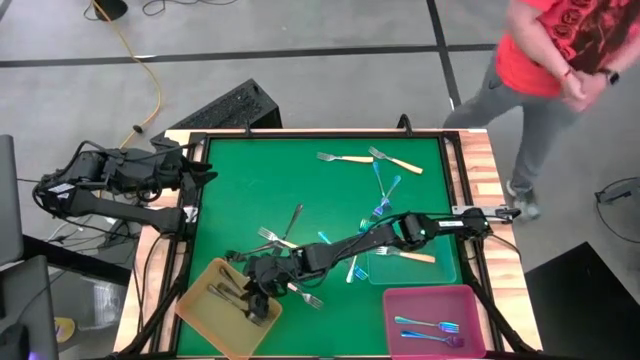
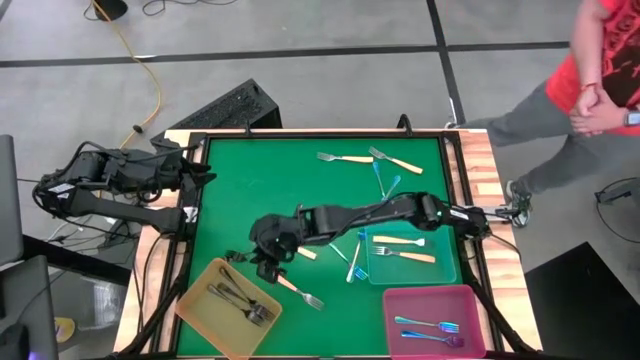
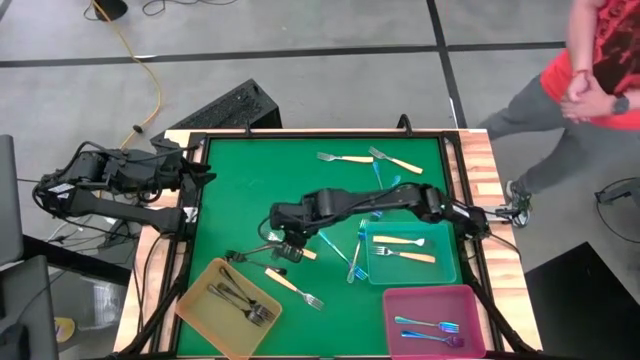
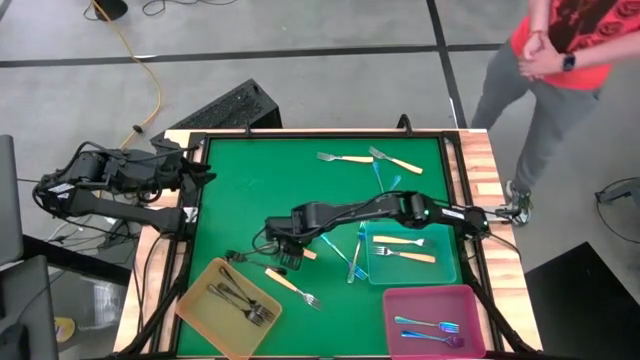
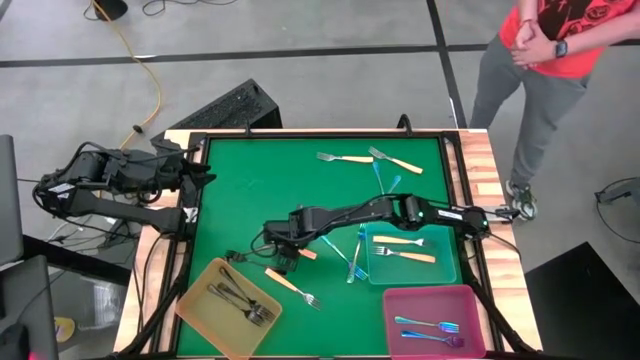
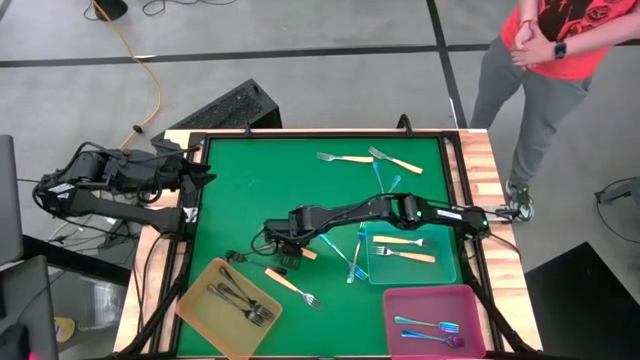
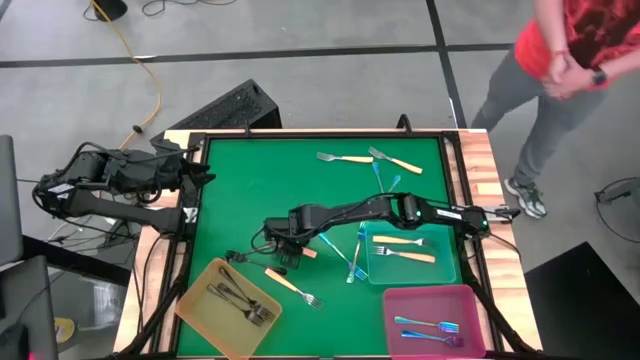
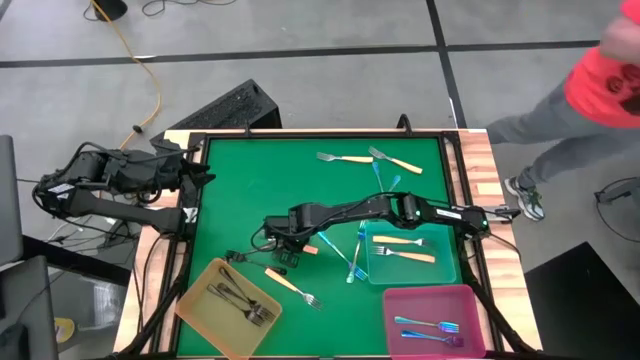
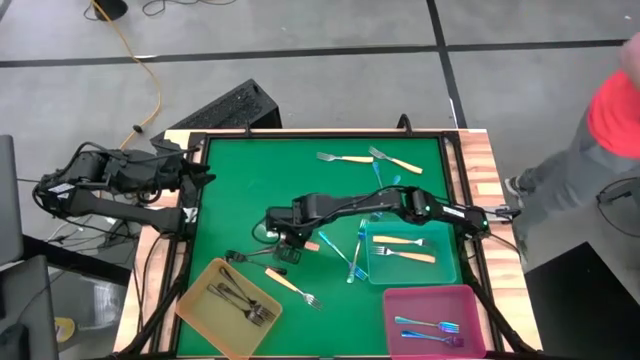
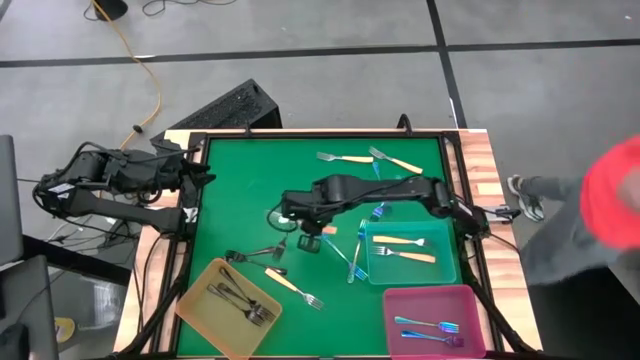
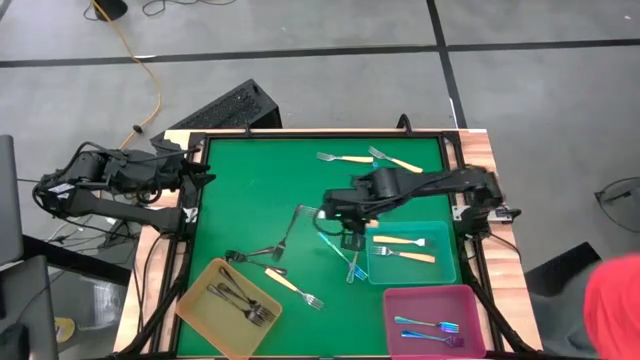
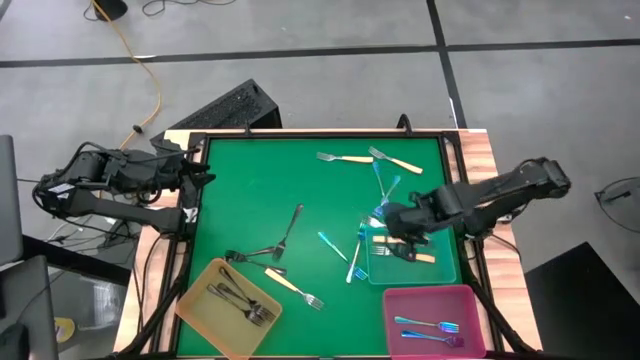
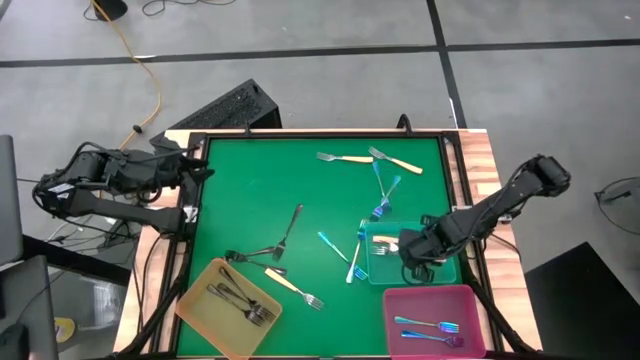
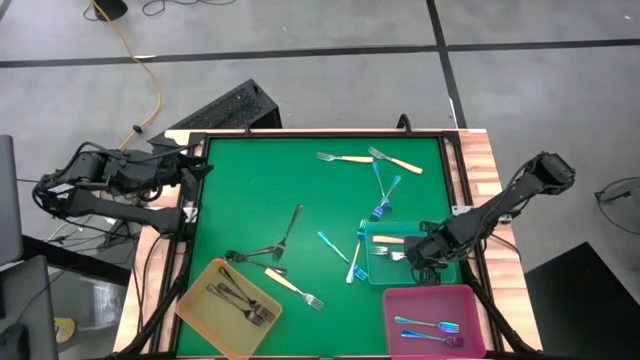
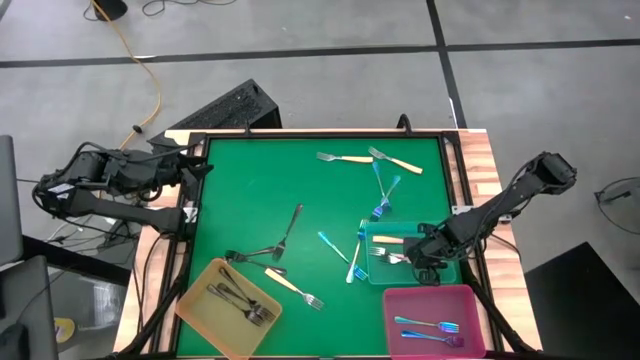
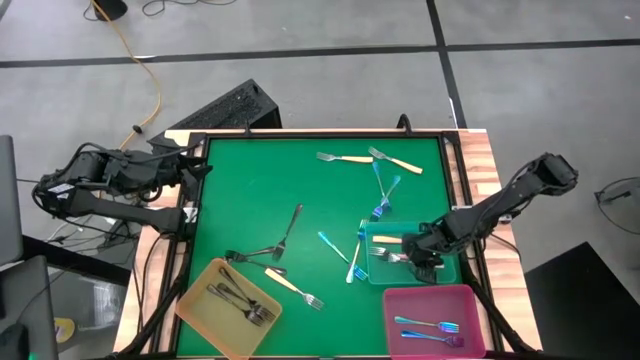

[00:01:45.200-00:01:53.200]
Task: Sort silverware by color (type)
Put the yellow fork into the green bin

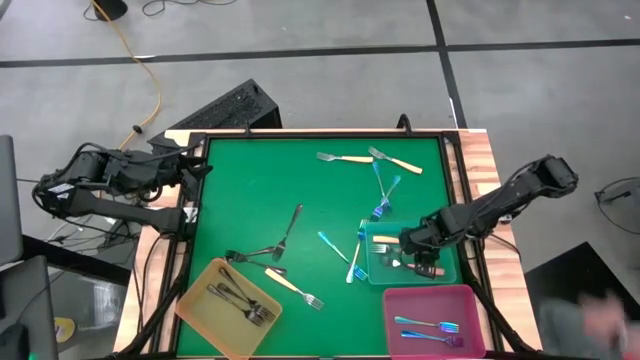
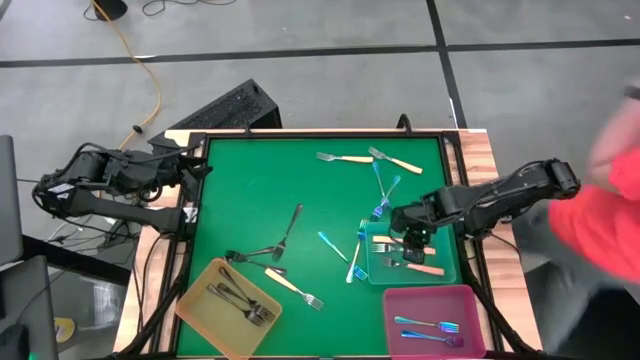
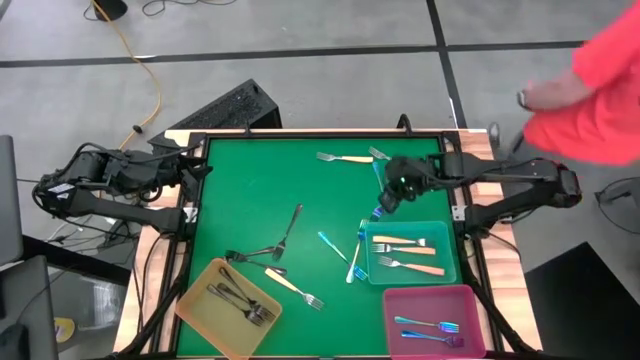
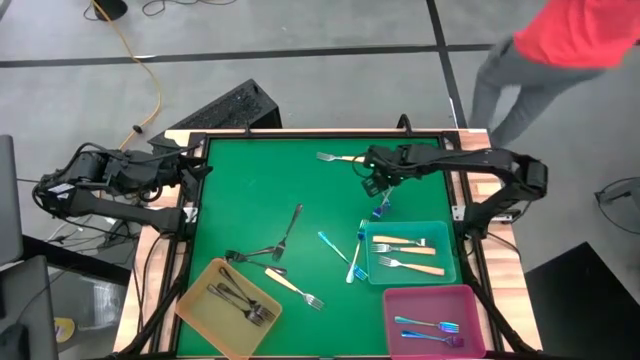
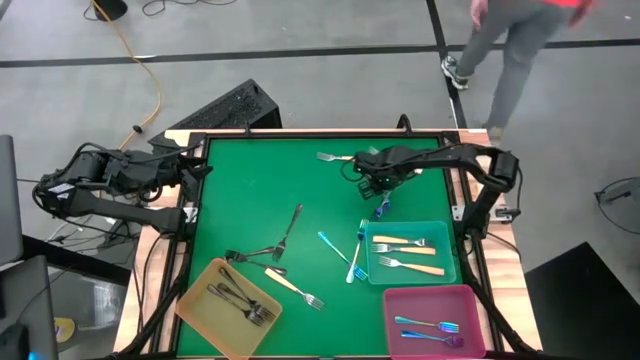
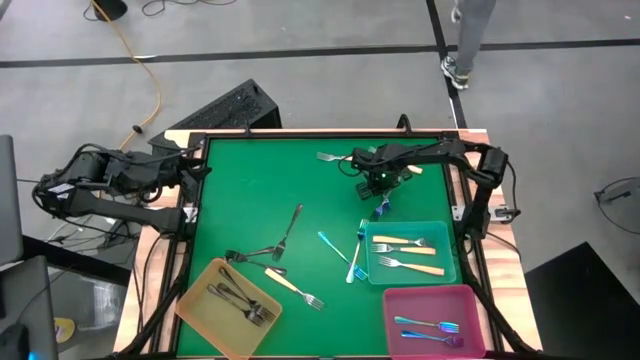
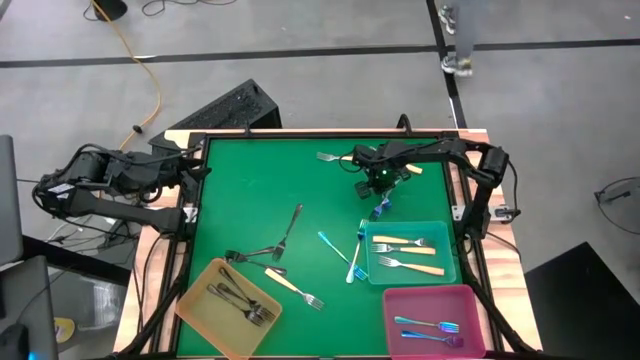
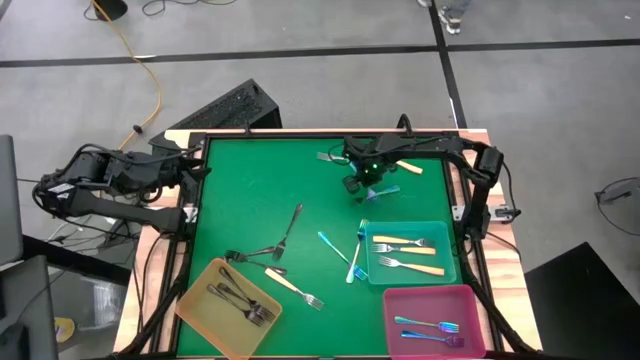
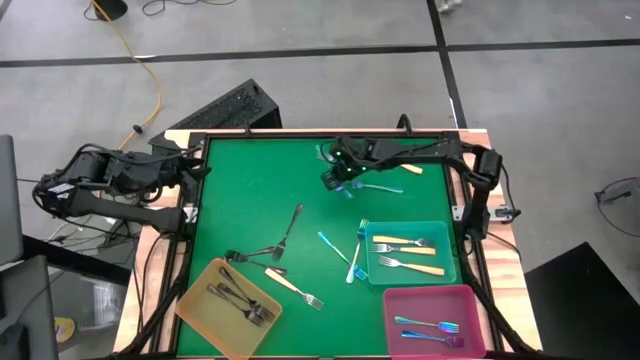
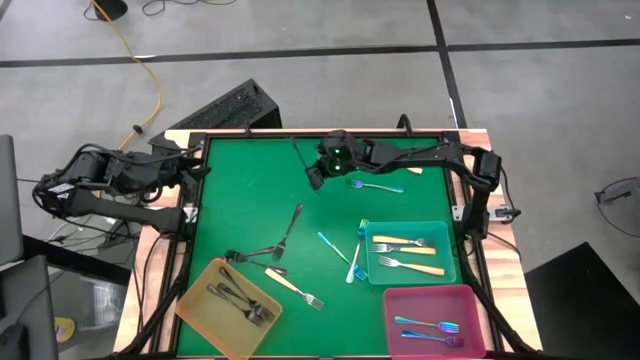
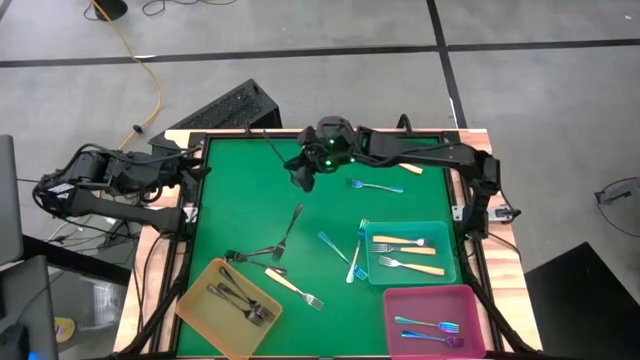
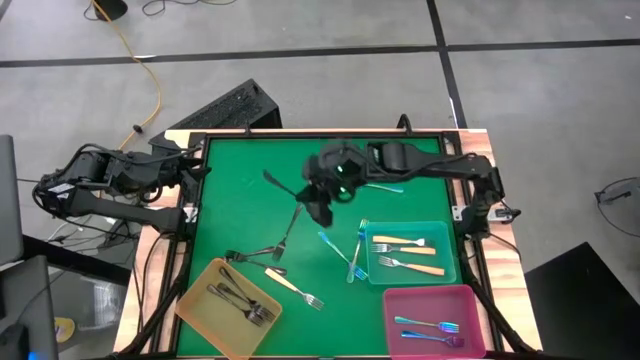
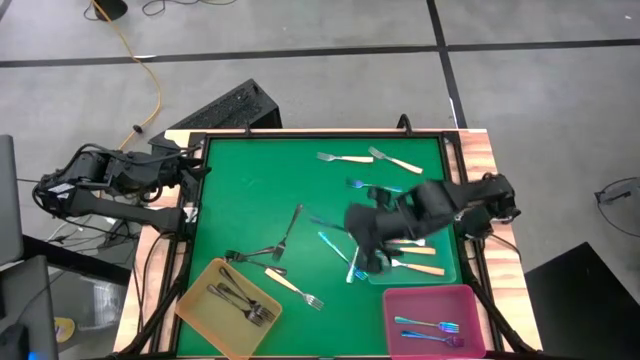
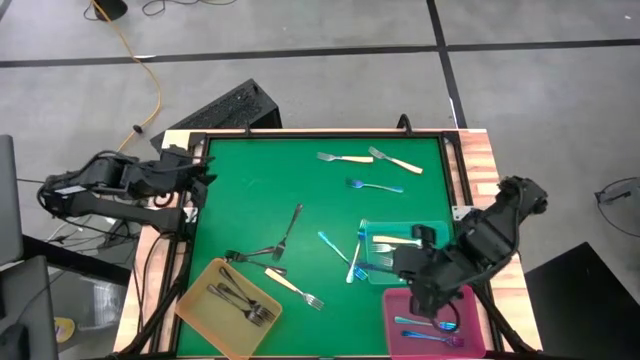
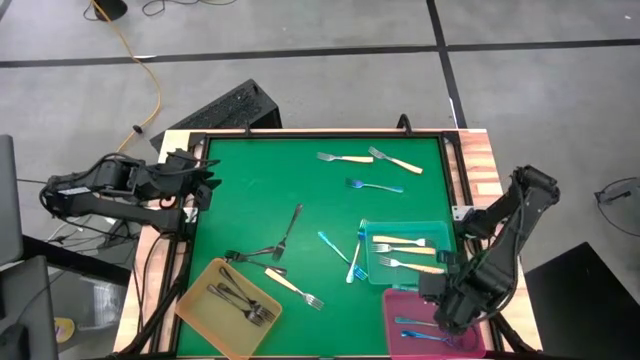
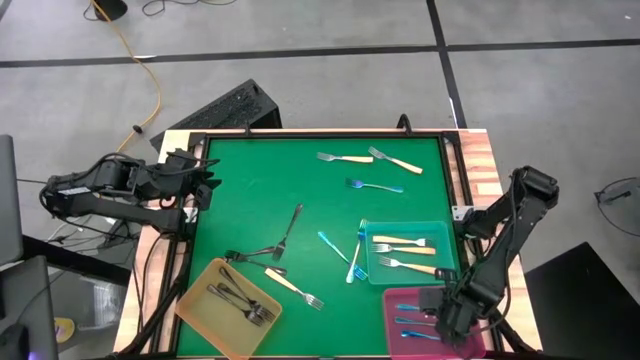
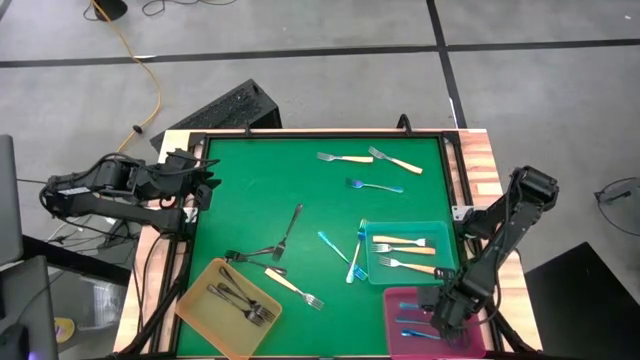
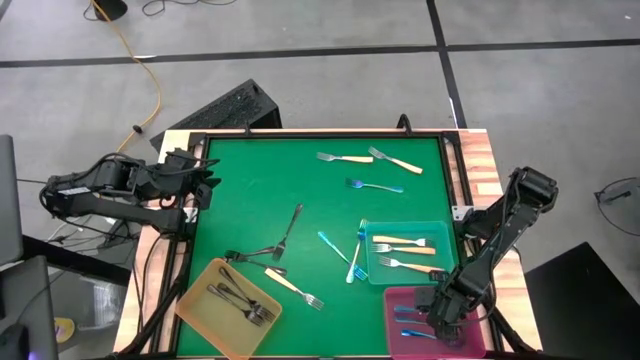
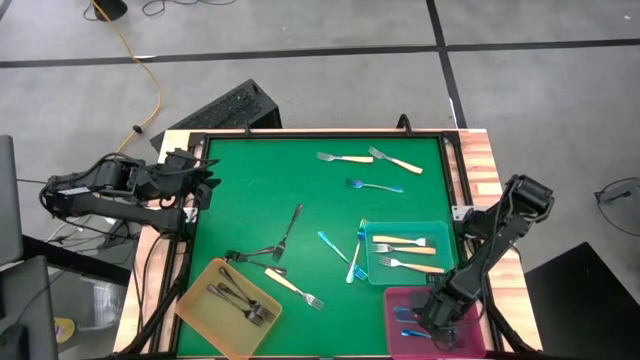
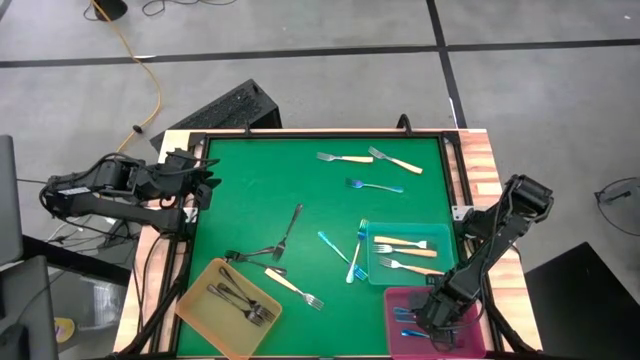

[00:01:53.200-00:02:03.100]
Put the purple fork into the pink bin

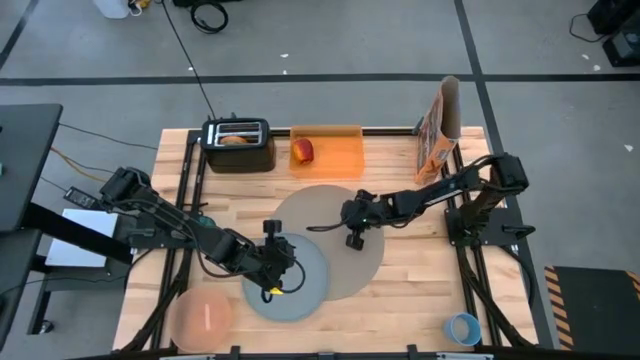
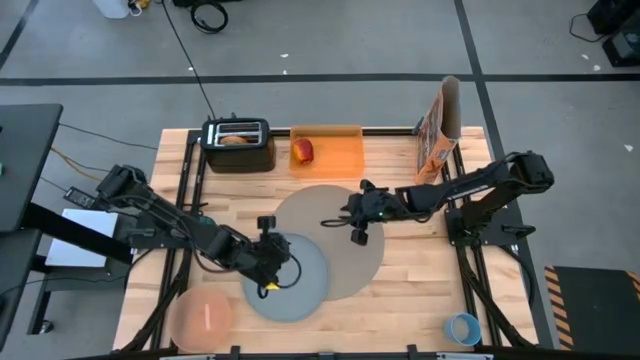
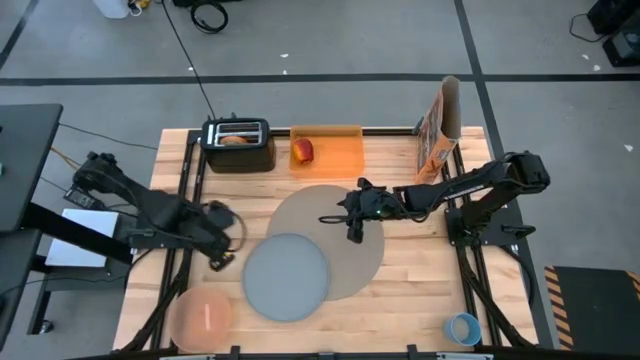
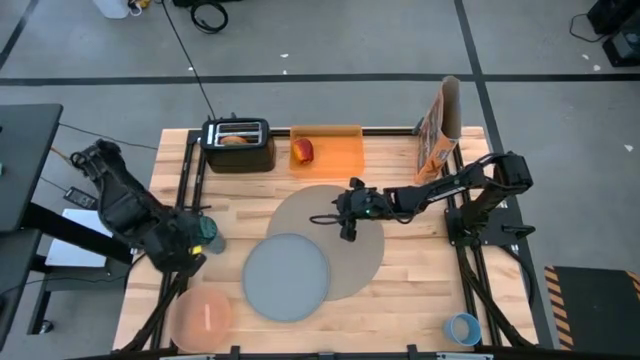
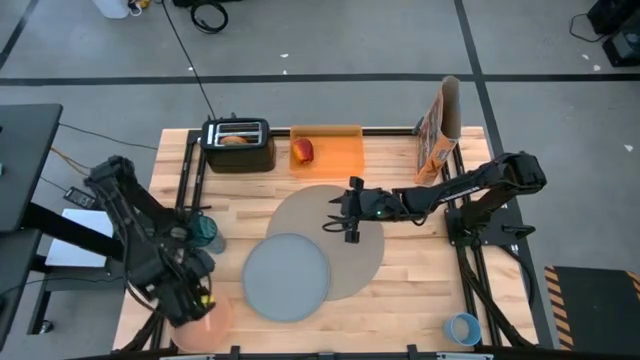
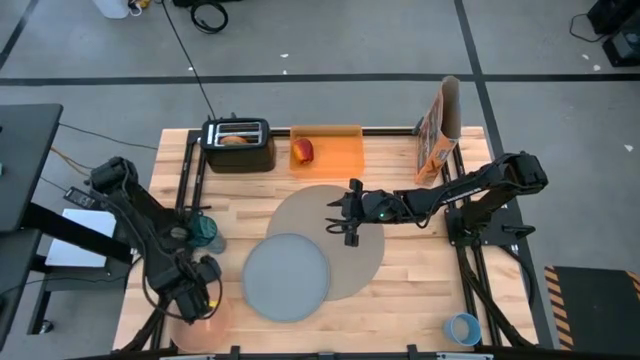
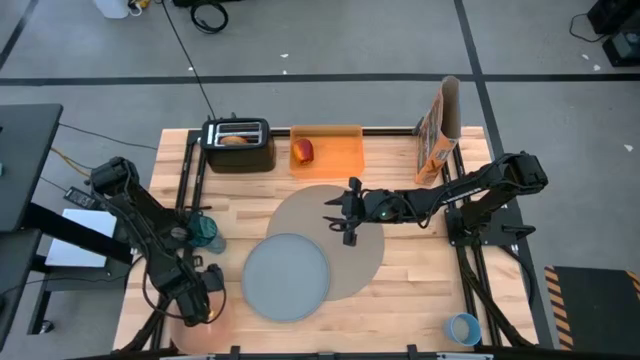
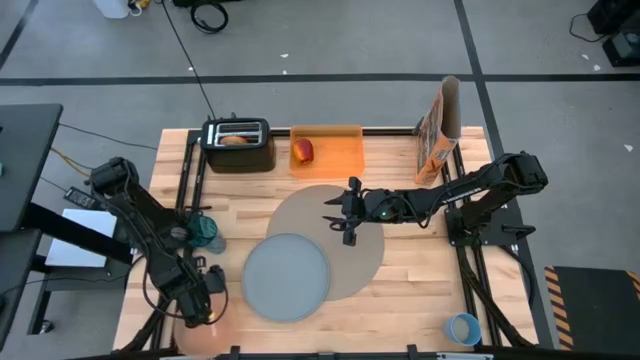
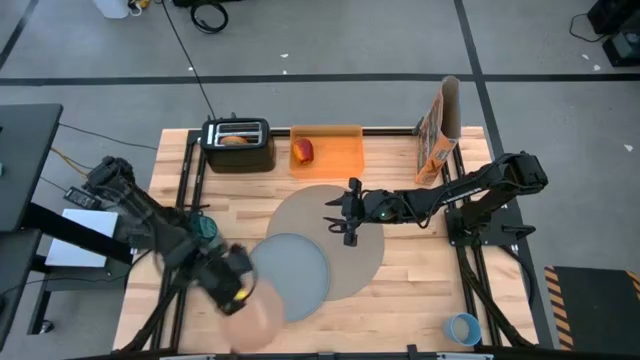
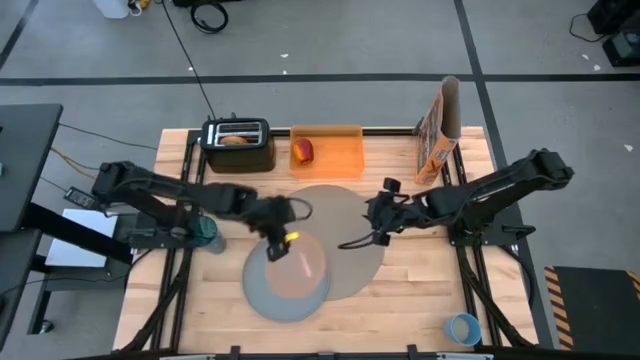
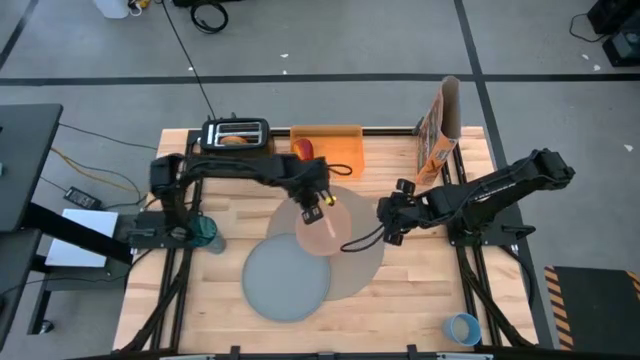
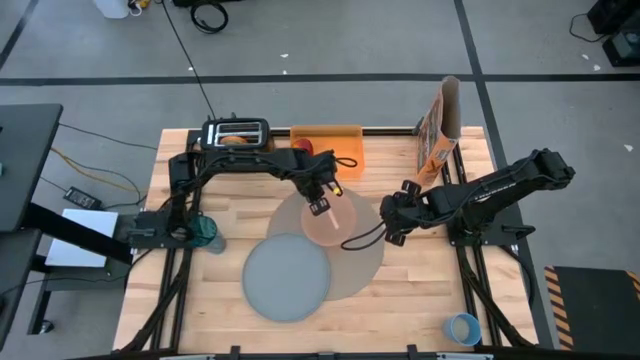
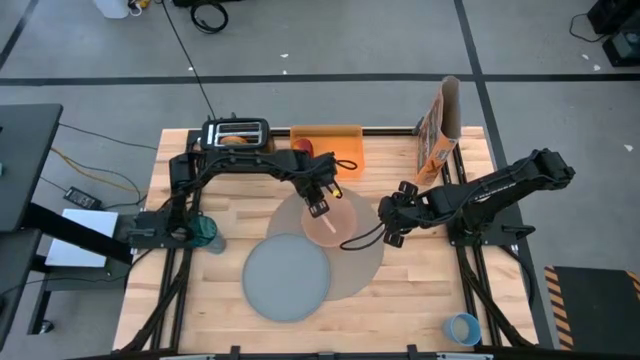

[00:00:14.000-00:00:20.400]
Task: Arrange a breakfast setting
Put the pink bowl on the brown tablemat
